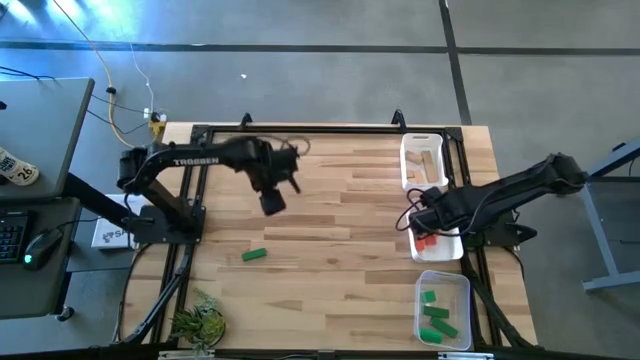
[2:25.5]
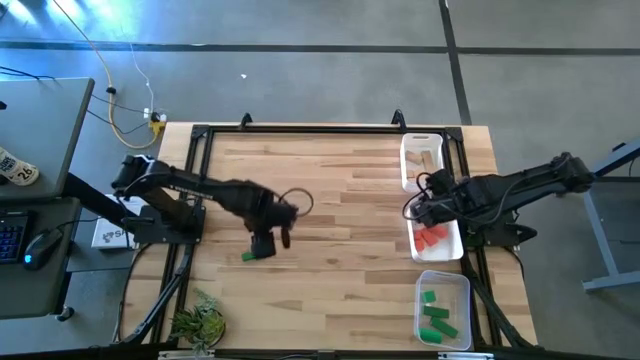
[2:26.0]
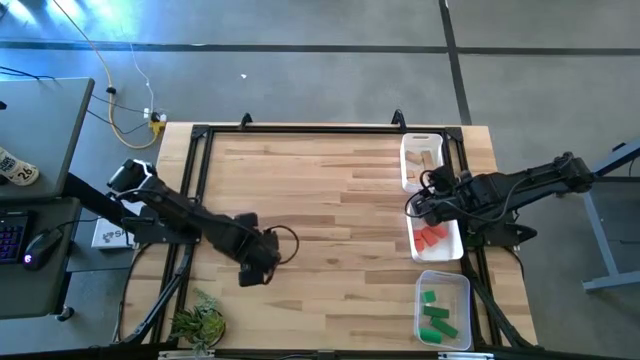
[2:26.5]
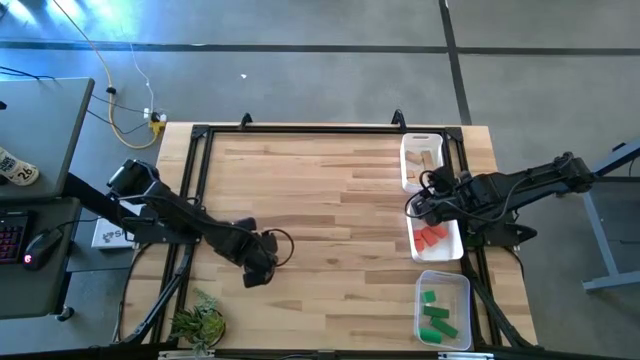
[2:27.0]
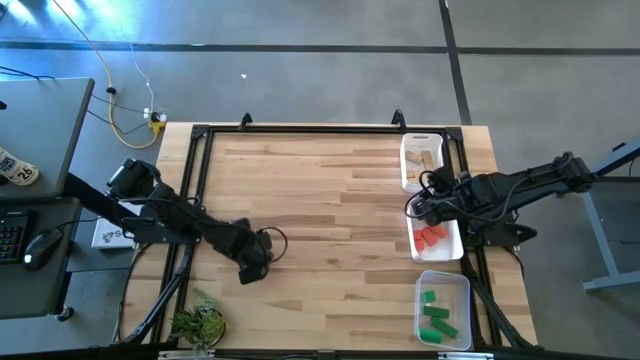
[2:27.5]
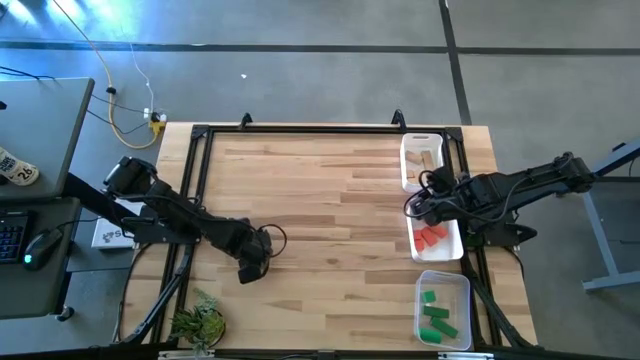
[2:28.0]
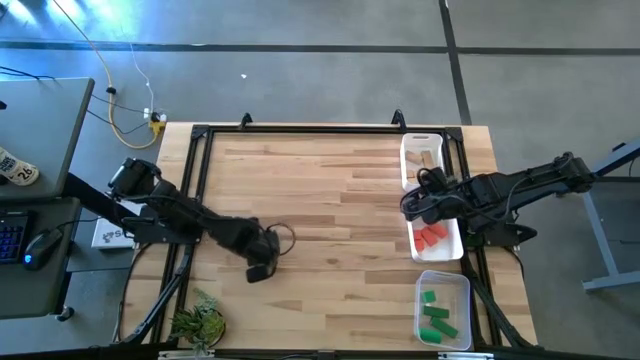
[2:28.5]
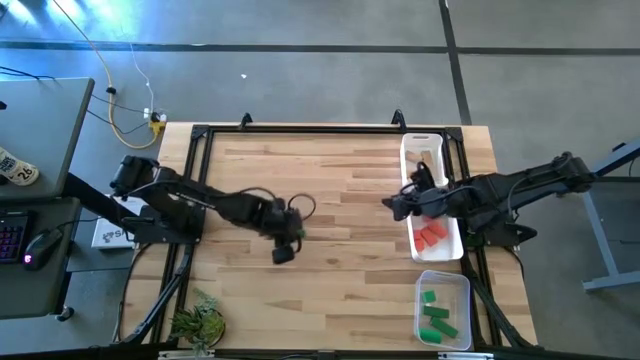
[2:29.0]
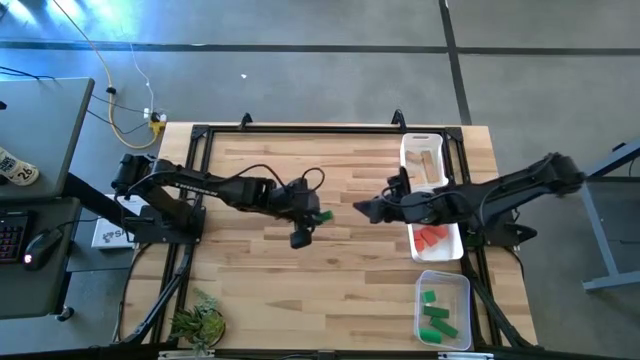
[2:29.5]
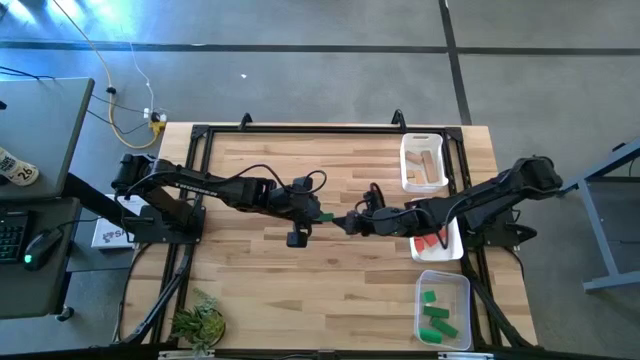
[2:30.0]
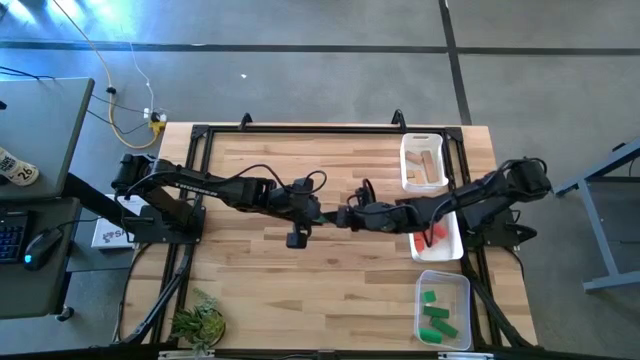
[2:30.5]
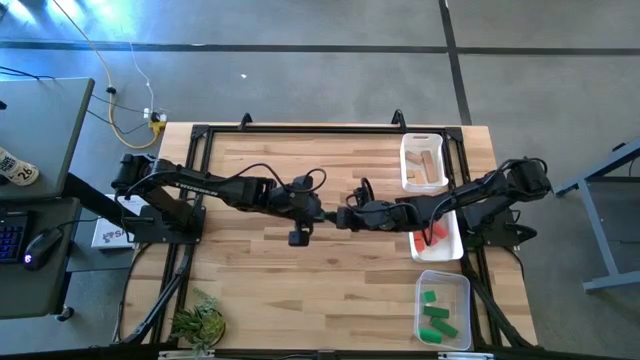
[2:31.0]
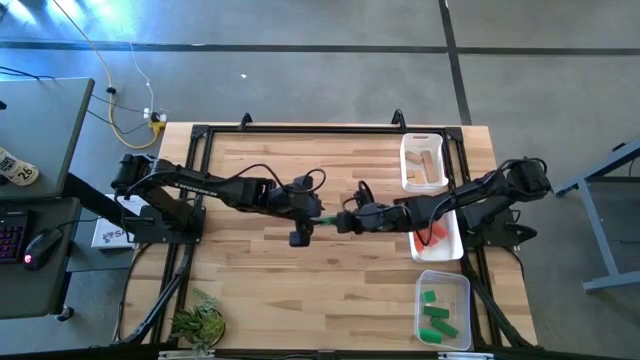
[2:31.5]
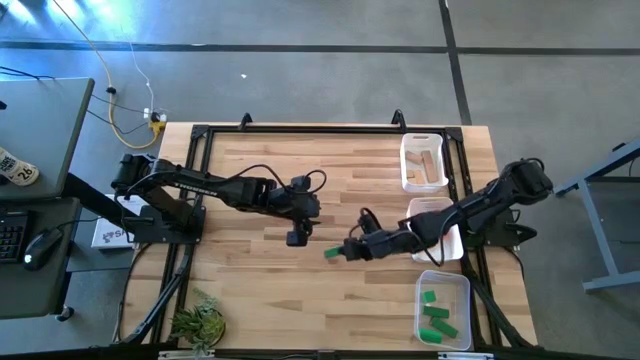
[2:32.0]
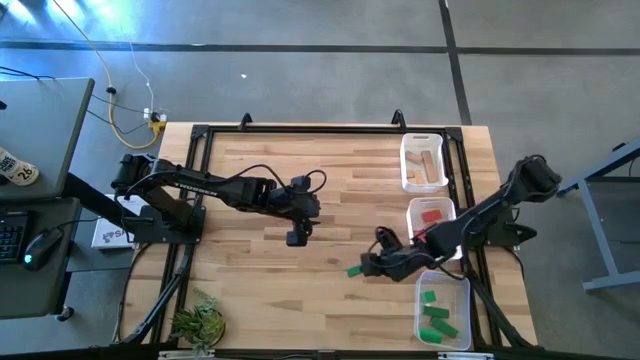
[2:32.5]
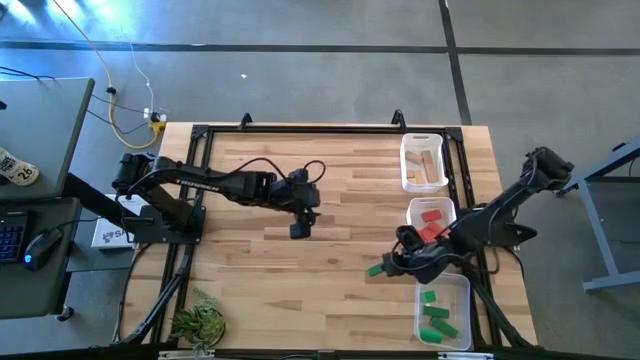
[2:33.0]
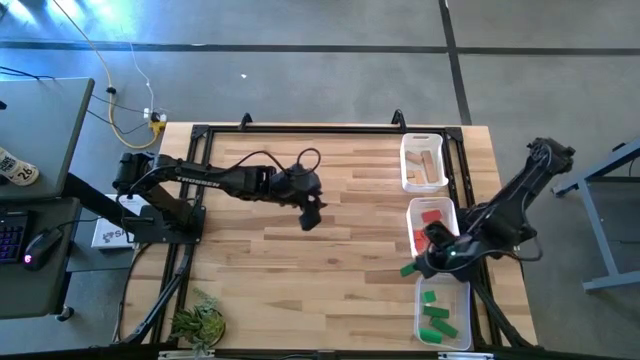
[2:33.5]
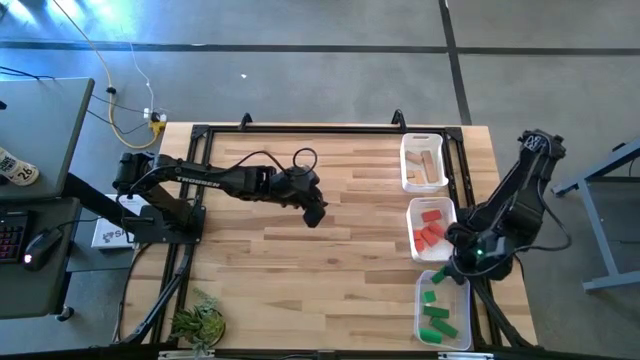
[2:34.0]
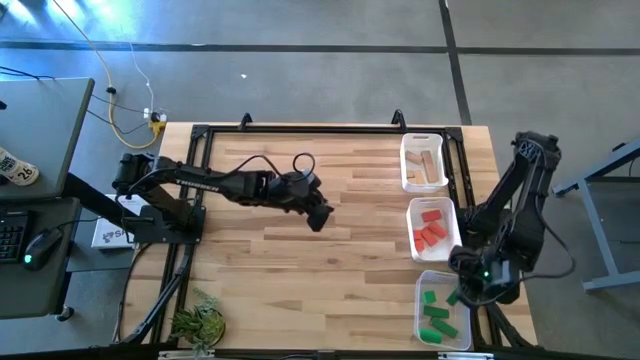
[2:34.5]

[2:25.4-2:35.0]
Task: Sort & place blocks by color
Put the green block into the transparent bin

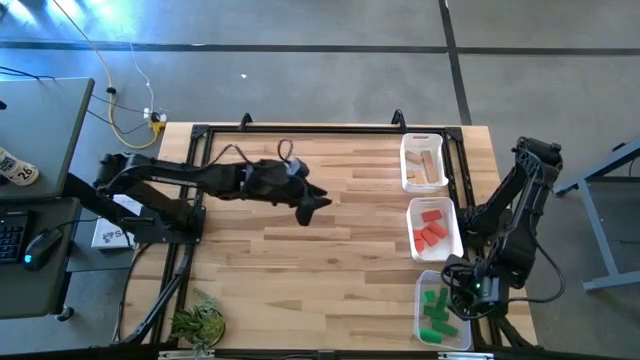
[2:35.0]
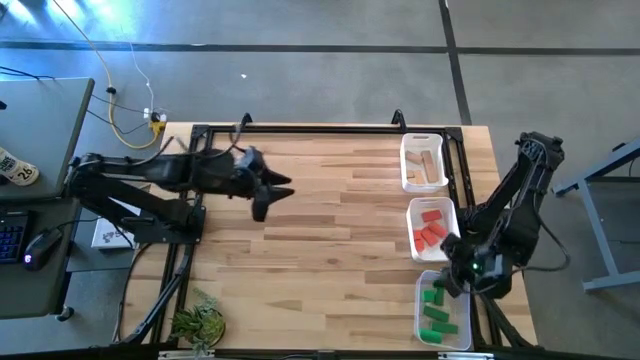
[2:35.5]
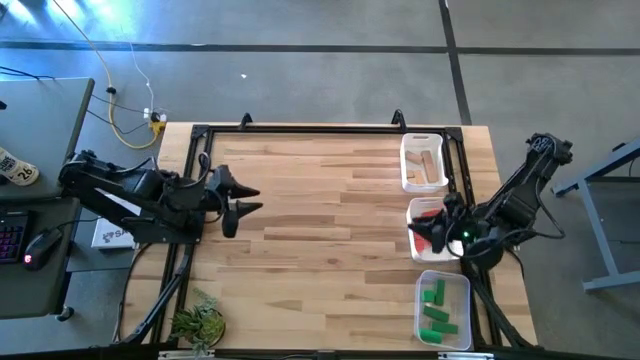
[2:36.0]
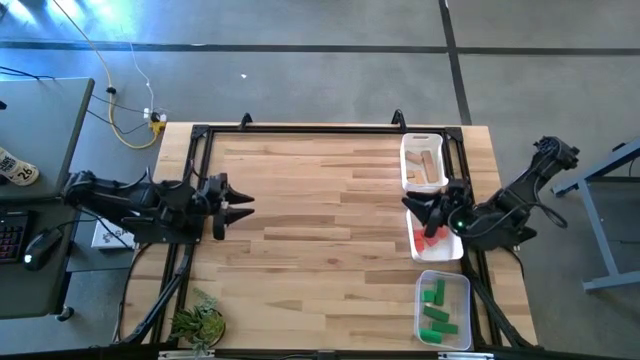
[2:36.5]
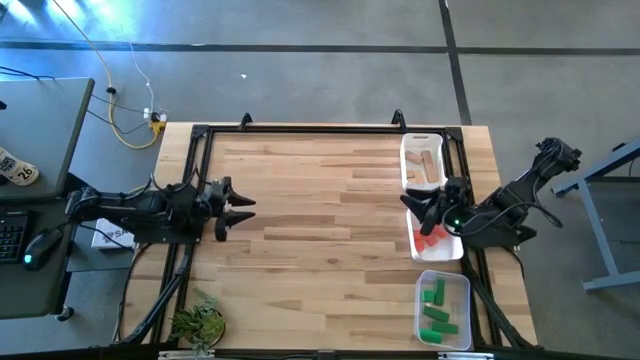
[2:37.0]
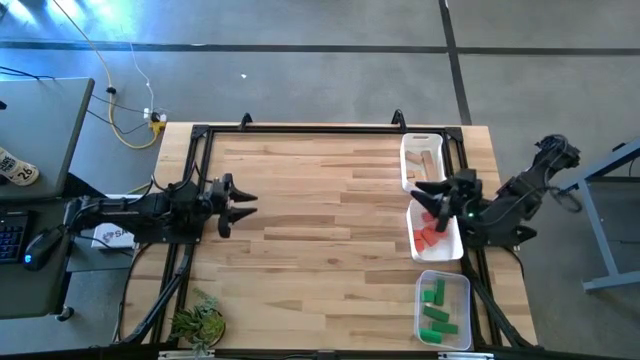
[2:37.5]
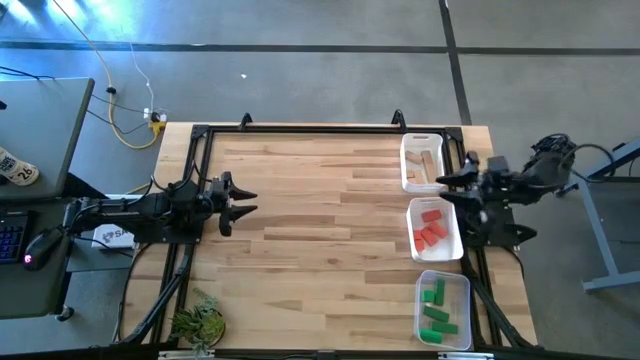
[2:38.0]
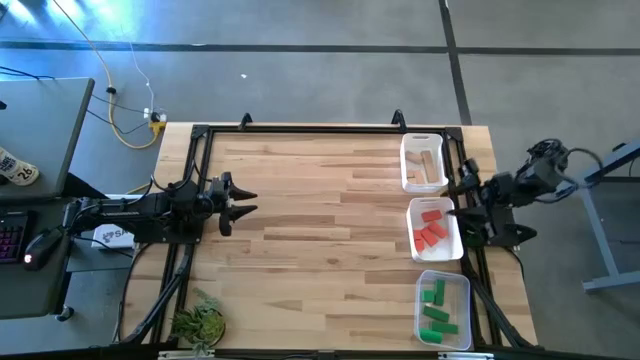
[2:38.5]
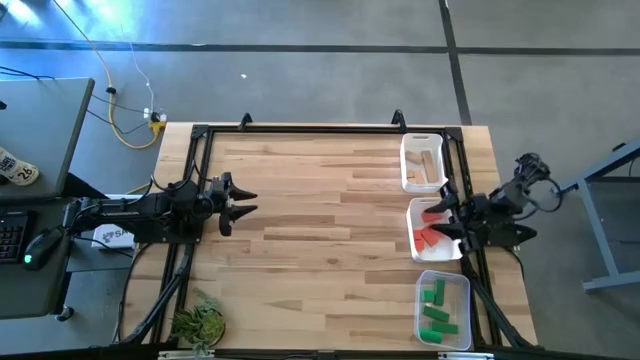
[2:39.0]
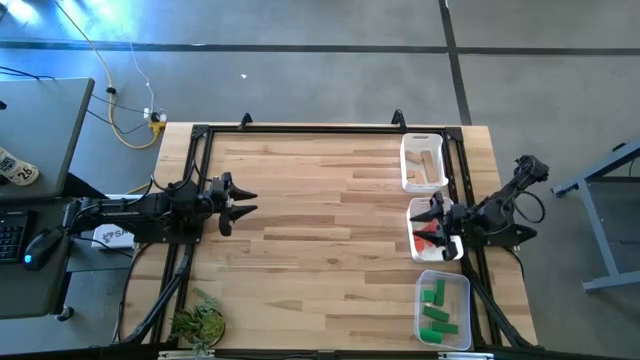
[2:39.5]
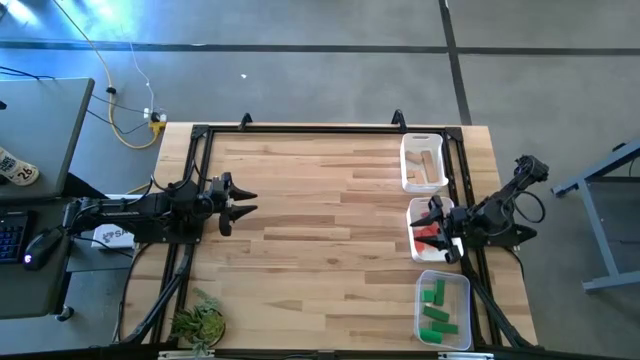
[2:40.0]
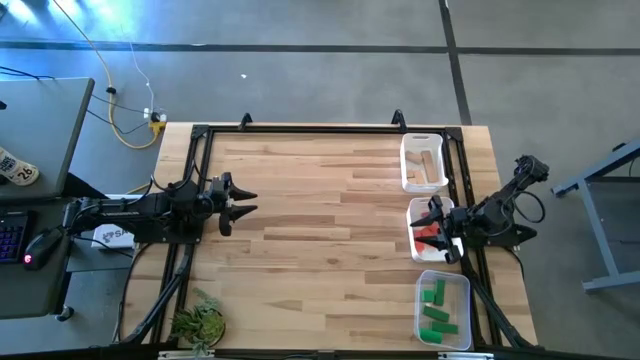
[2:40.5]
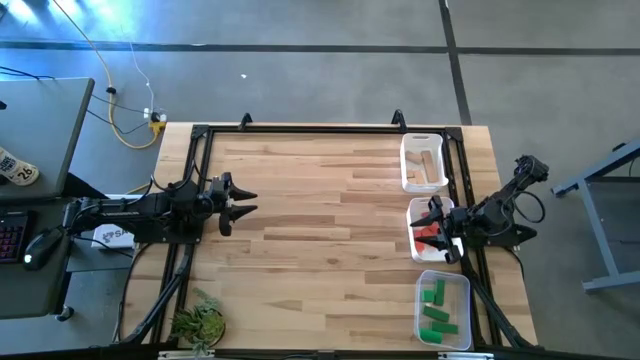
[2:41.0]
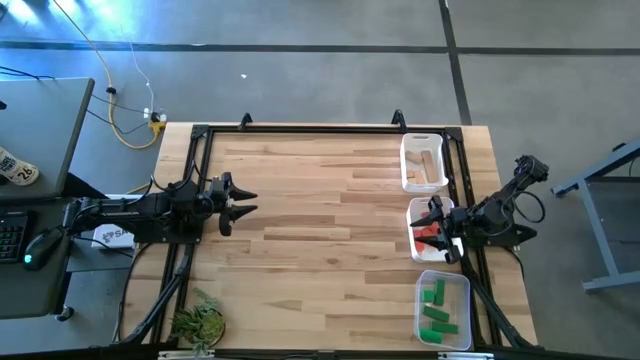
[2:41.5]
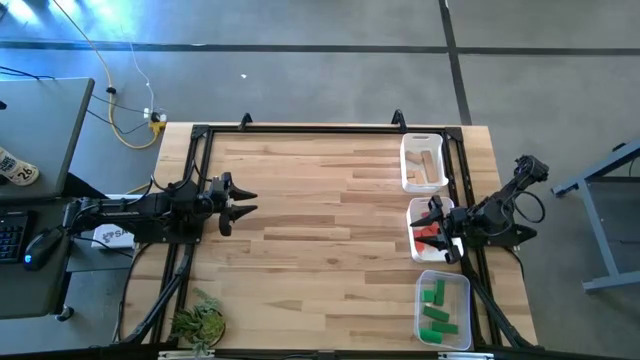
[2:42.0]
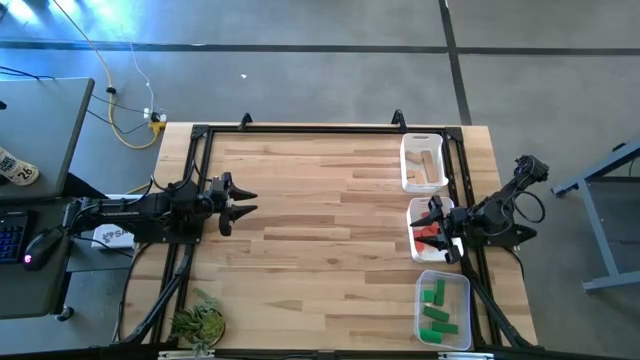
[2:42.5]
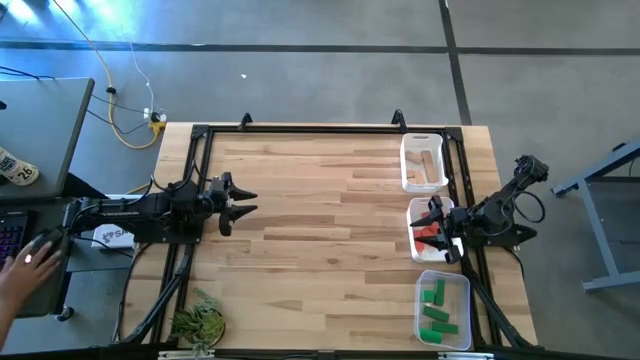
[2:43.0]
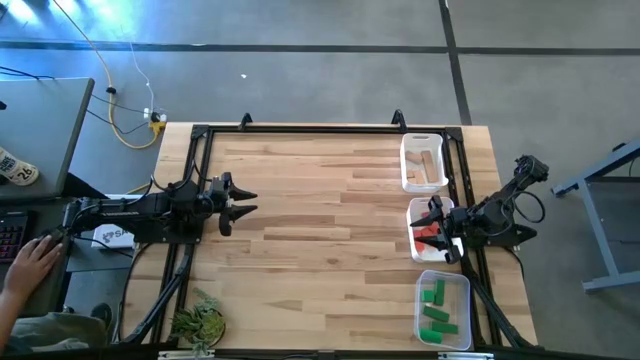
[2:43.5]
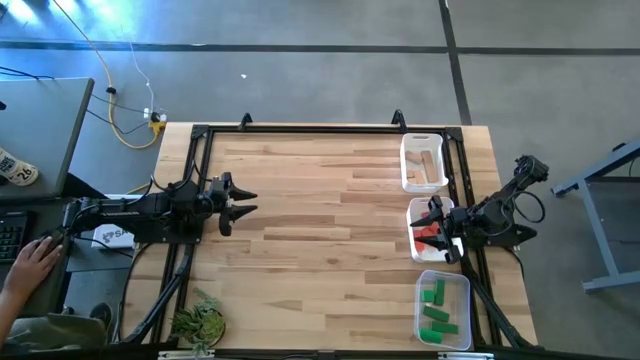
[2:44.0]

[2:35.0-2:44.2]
Return to Home Position

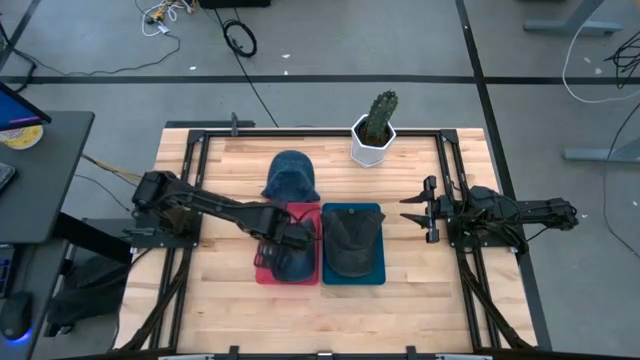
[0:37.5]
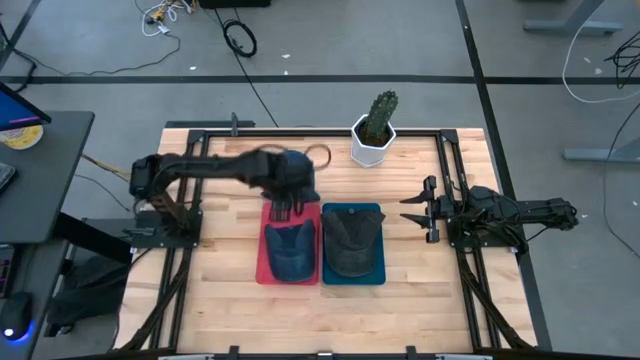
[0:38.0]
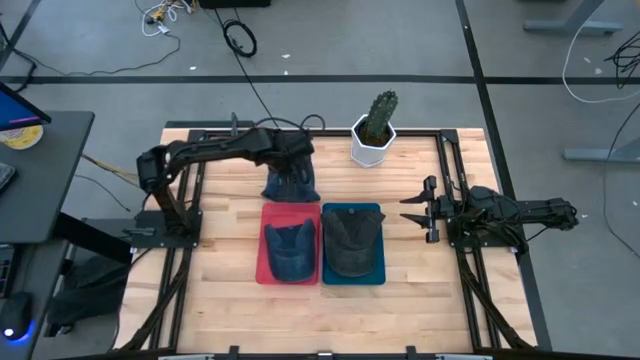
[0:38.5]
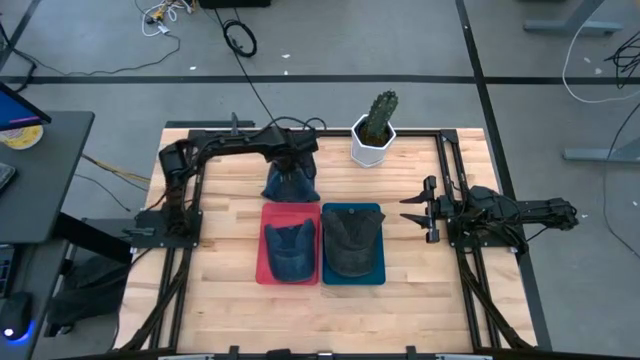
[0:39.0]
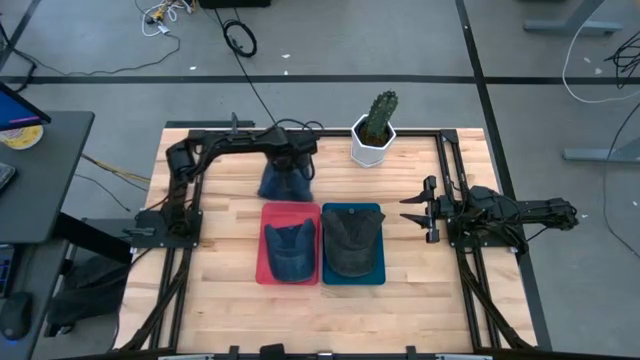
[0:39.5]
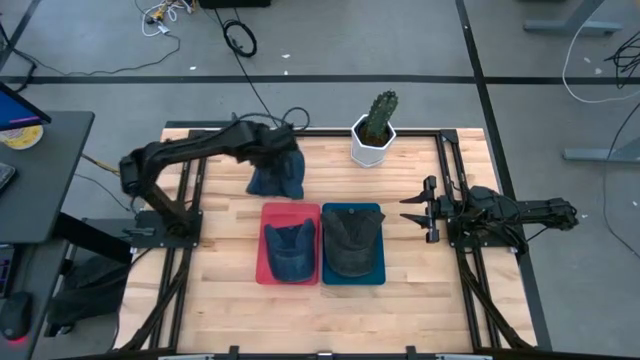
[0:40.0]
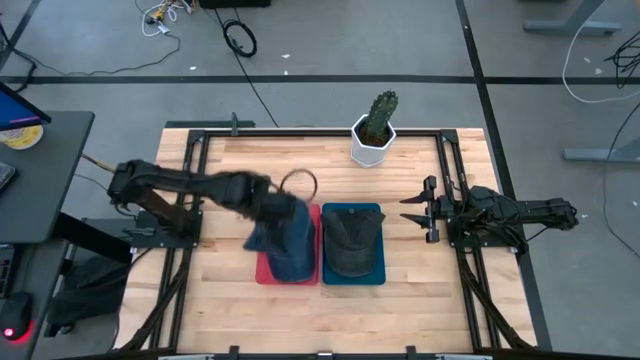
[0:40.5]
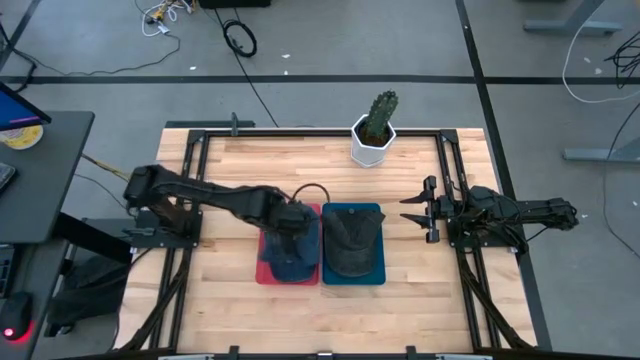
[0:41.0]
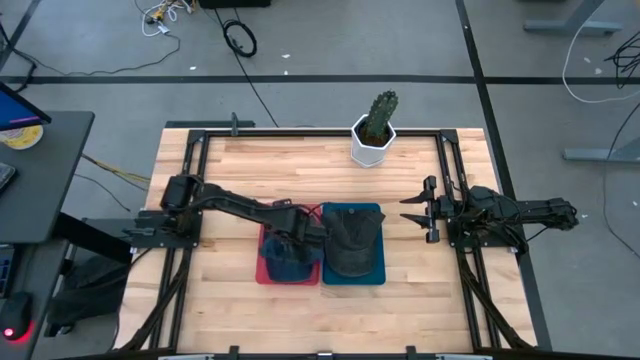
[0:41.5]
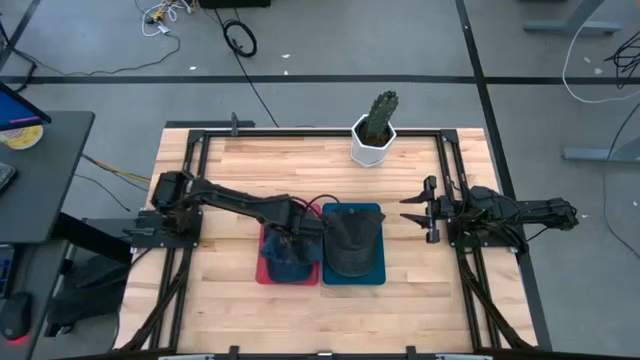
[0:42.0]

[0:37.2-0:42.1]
Task: Pick & Place hat
Put the blue cap into the pink bin
